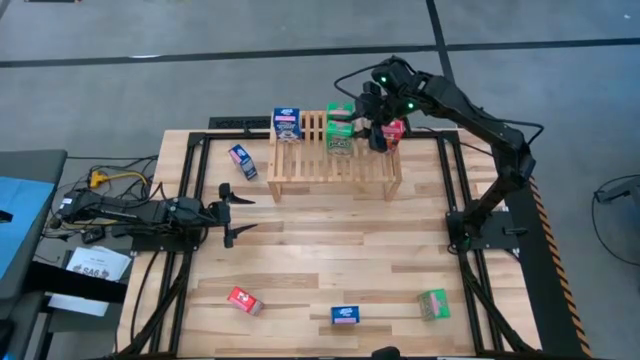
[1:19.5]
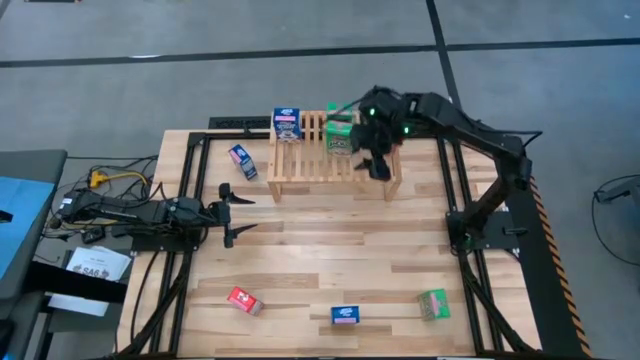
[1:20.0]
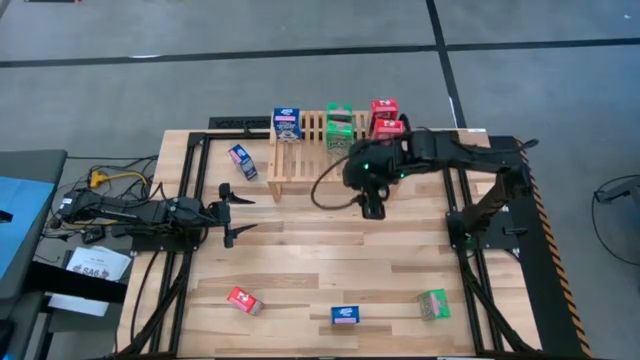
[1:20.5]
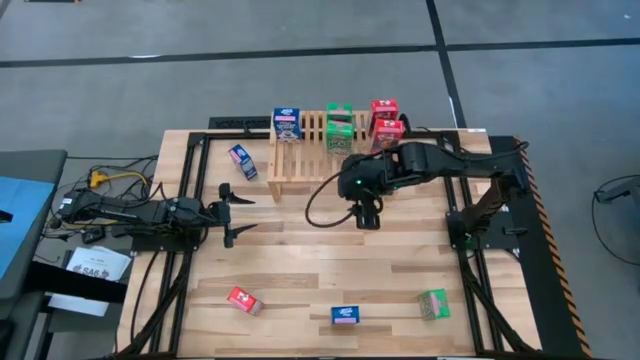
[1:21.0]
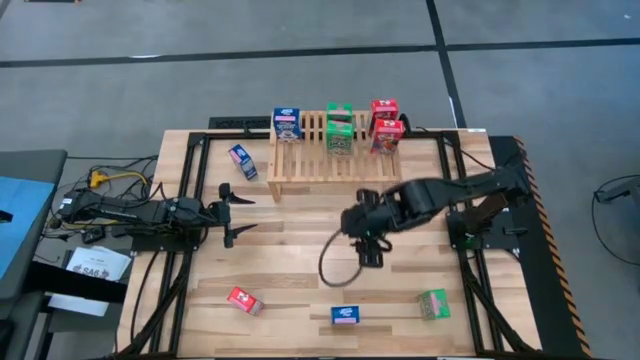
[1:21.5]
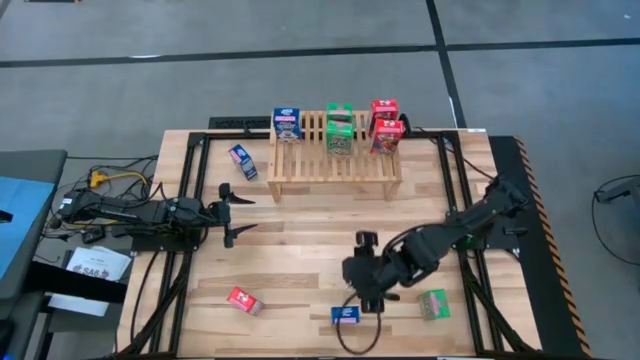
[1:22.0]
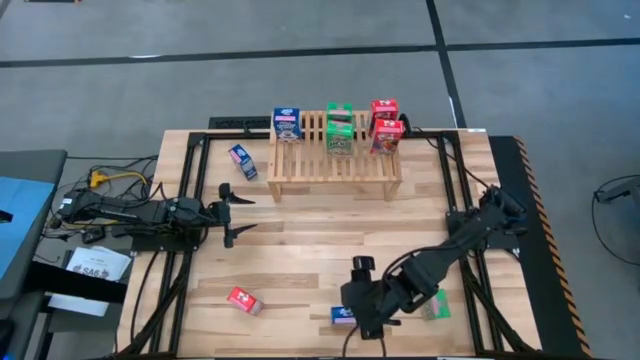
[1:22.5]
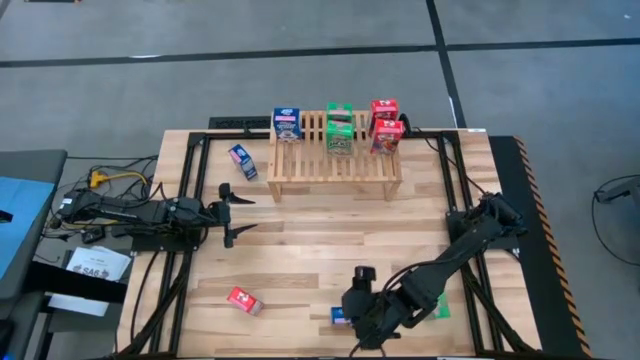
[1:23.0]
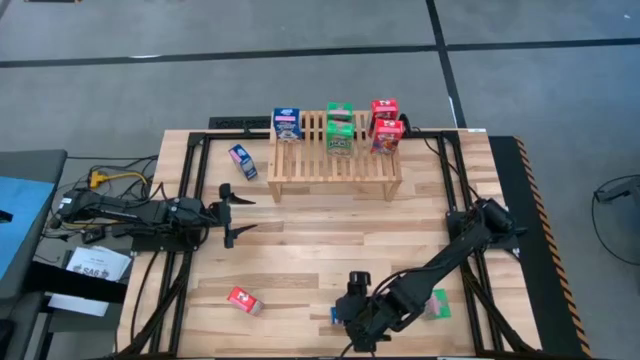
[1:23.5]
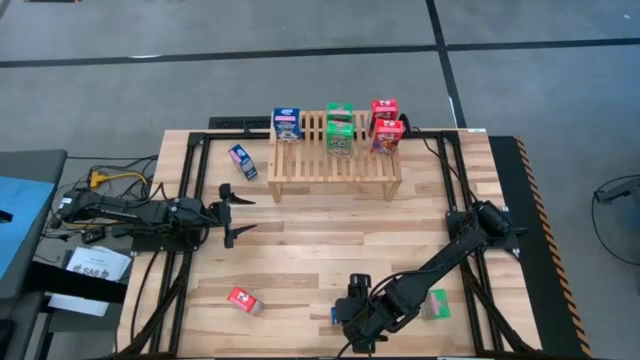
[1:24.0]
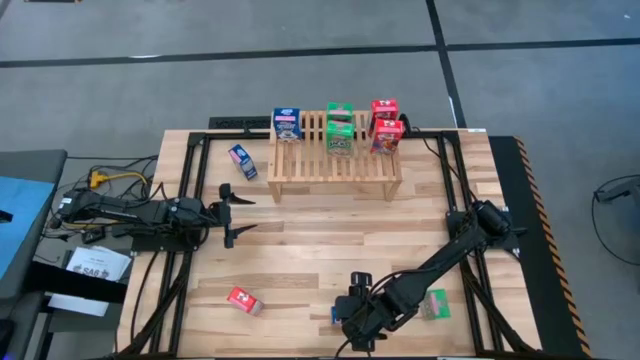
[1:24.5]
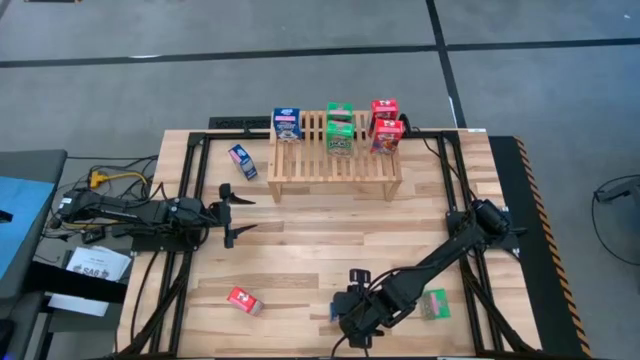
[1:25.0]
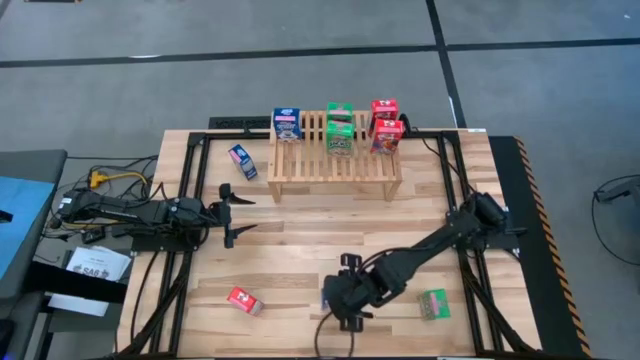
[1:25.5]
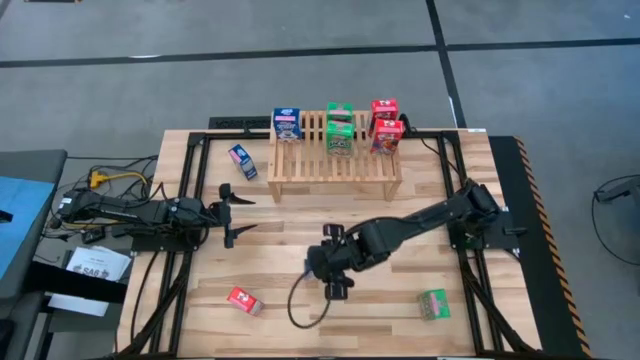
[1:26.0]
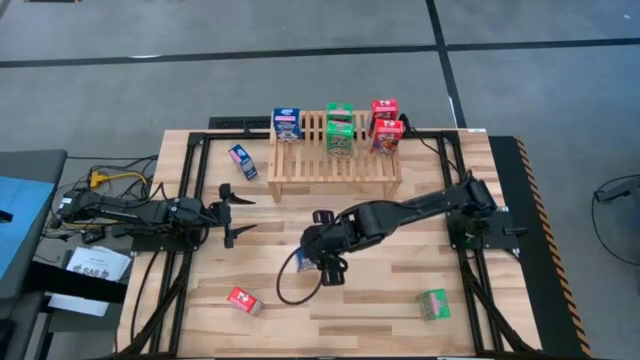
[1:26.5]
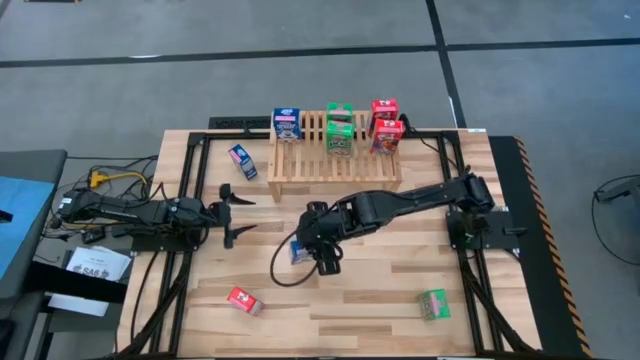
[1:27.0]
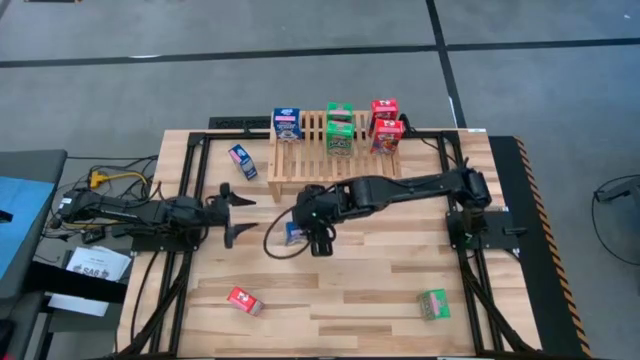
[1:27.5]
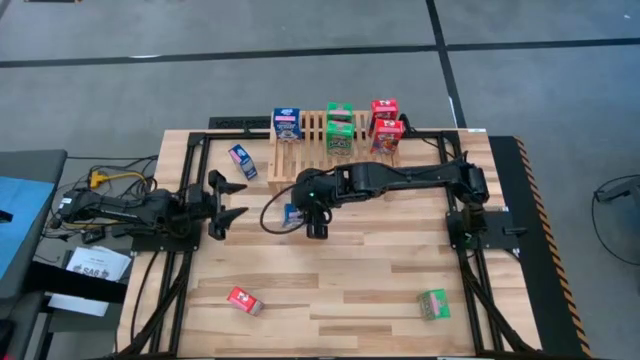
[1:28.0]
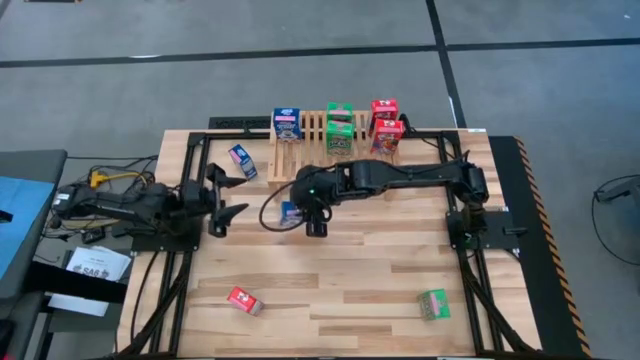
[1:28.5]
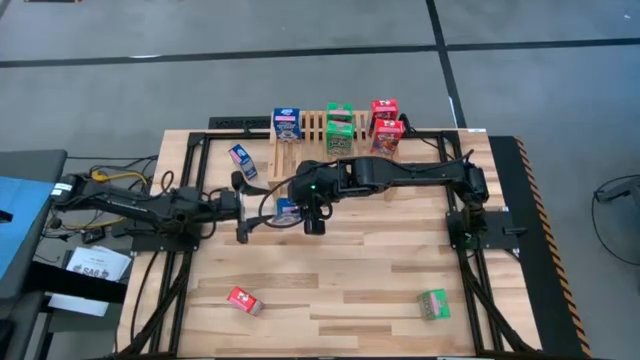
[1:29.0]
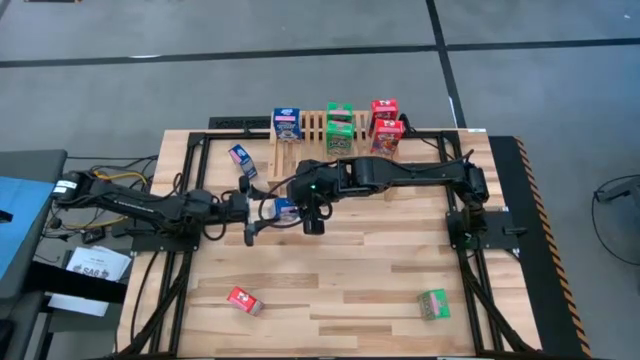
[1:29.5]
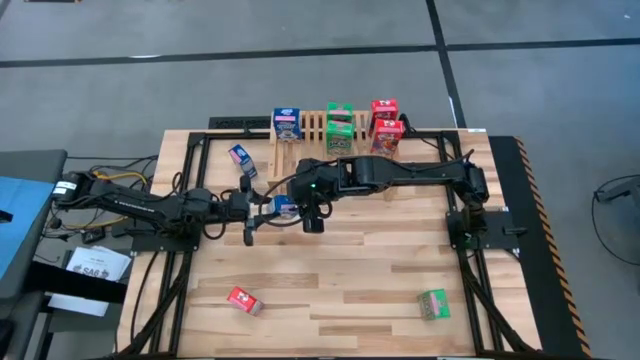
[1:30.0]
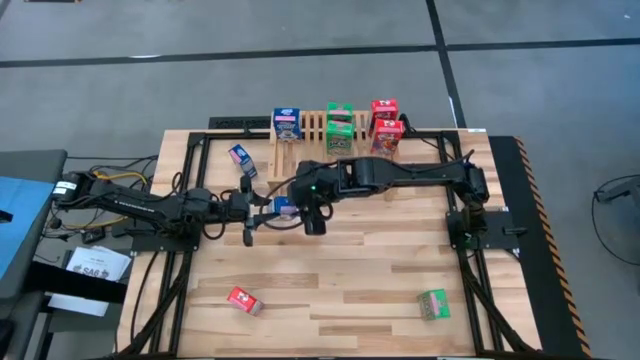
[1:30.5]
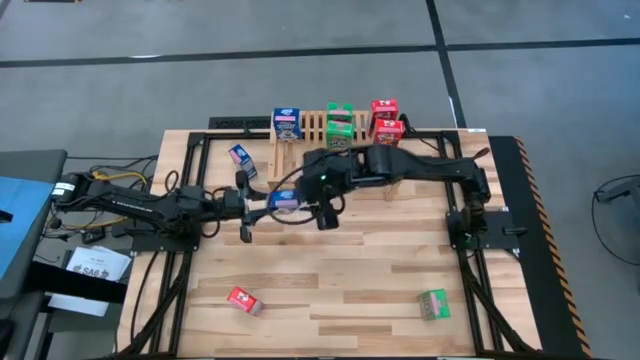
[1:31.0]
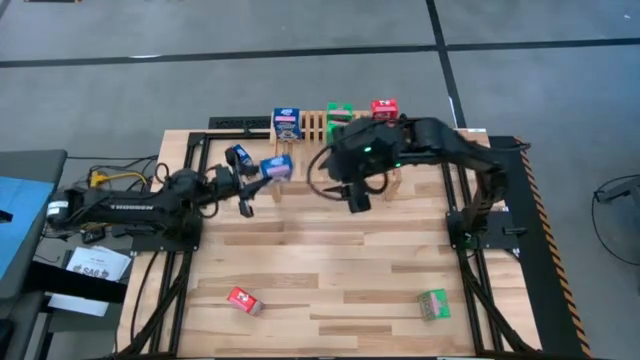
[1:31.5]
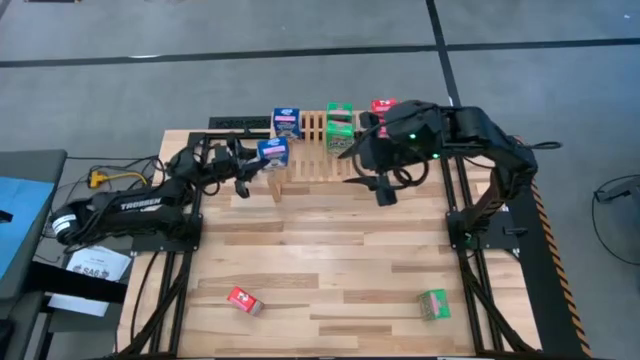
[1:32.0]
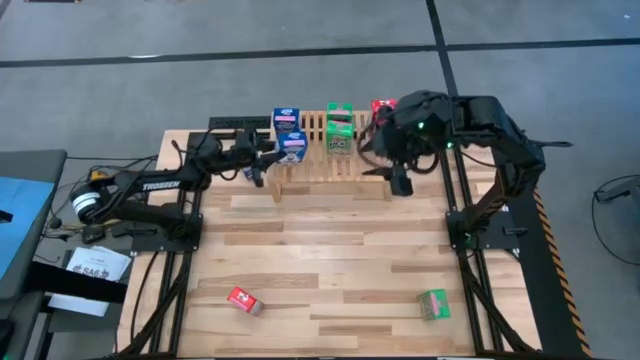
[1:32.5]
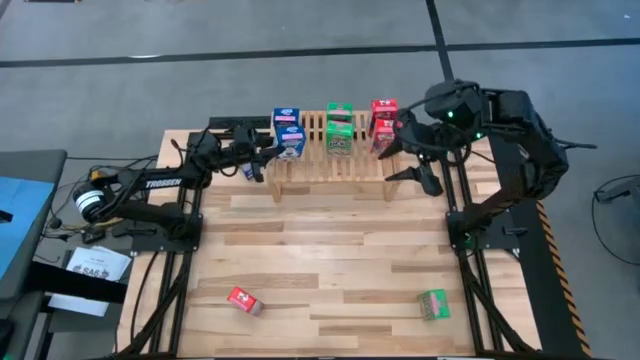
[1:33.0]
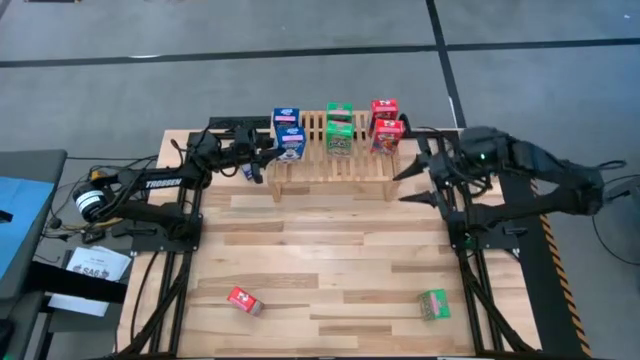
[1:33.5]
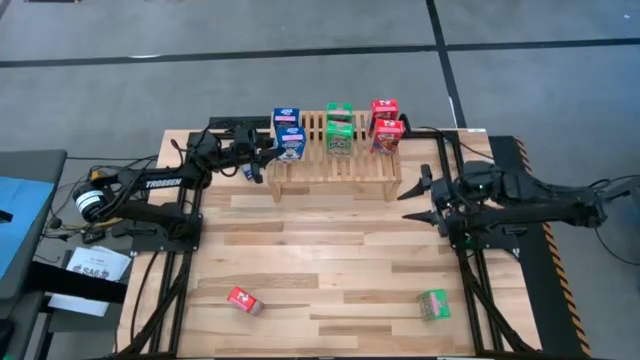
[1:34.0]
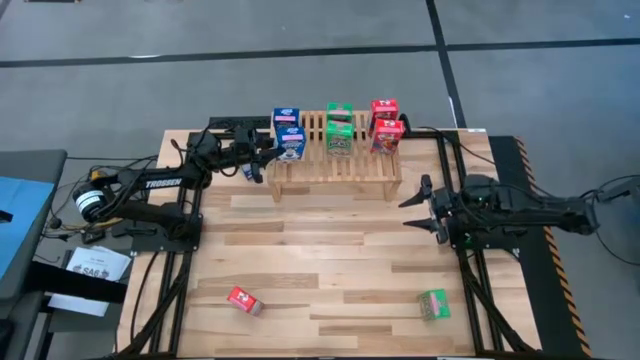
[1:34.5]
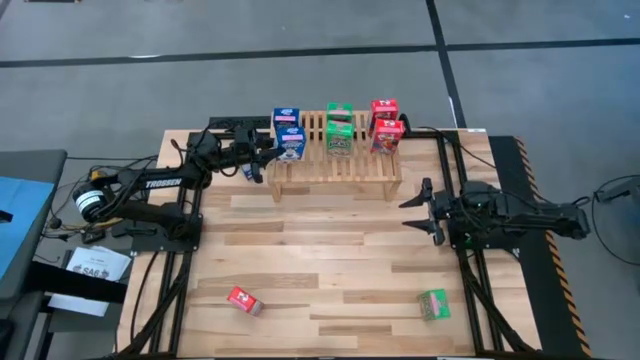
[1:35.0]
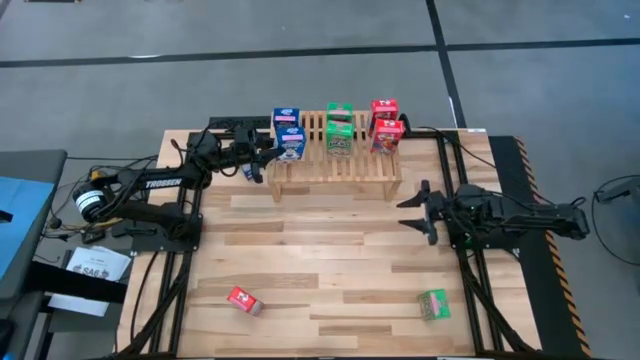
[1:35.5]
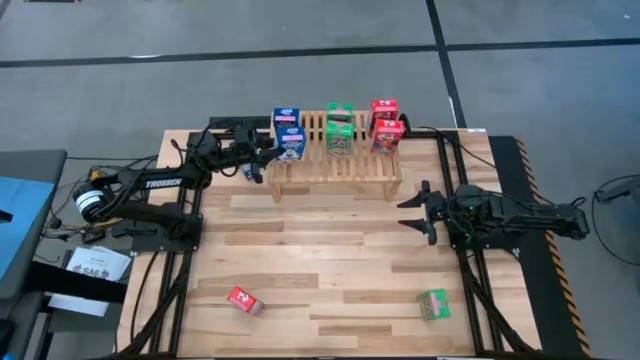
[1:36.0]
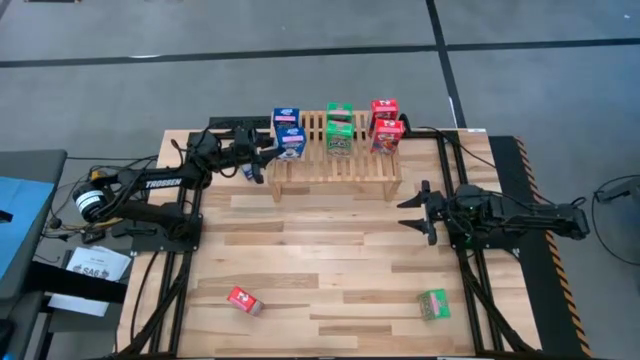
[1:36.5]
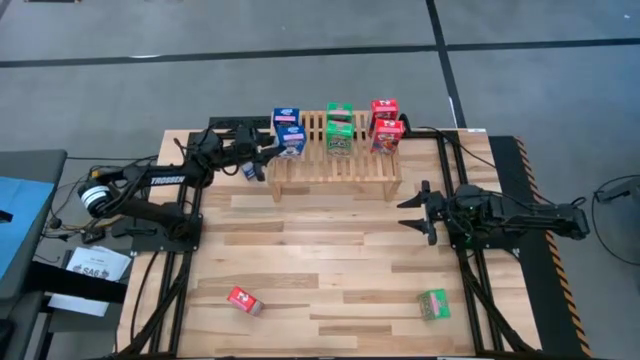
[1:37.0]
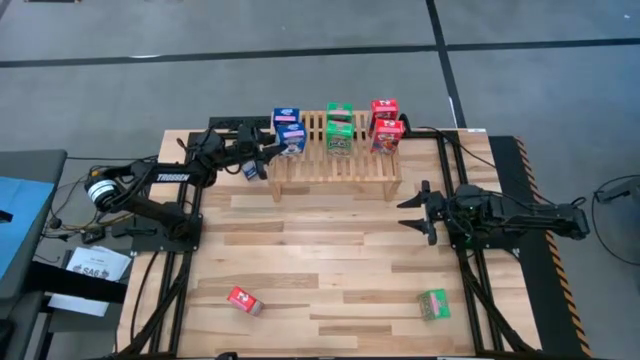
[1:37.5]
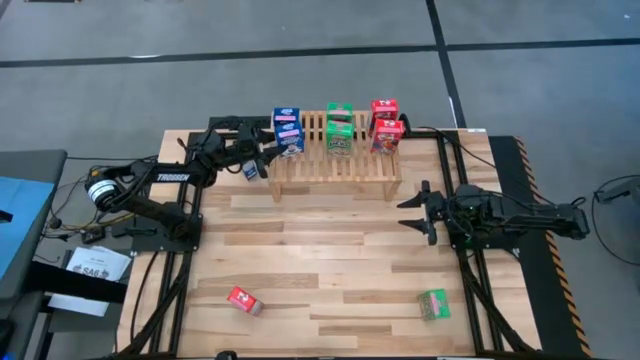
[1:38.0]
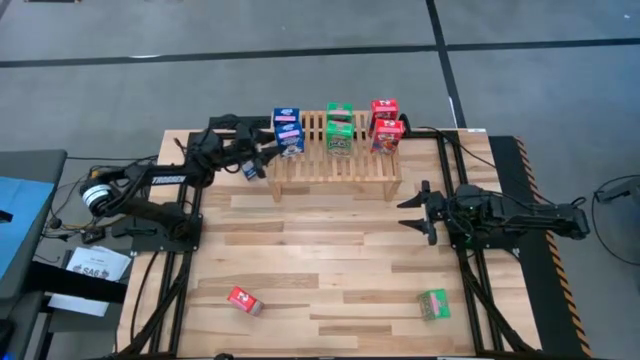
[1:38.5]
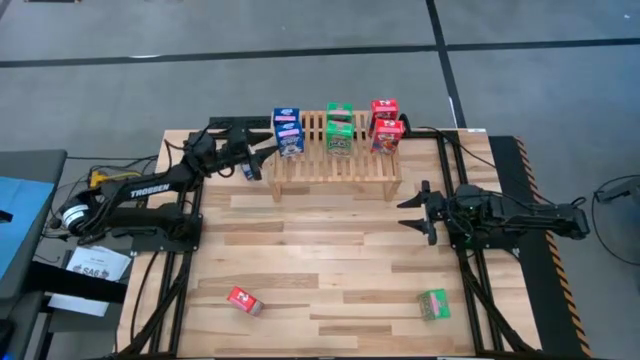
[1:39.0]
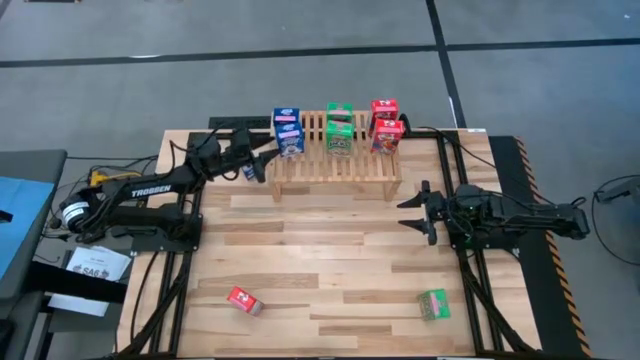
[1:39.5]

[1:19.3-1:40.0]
Task: Stack cereal on shelf
Put the bottom blue cereal box on the shelf aligned with the other blue cereal box
